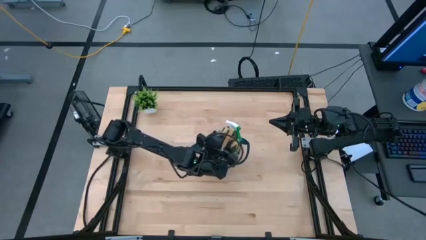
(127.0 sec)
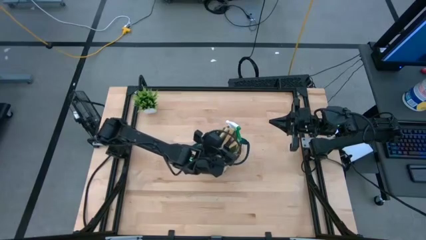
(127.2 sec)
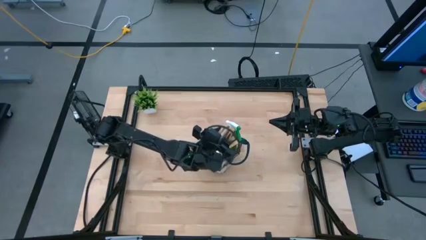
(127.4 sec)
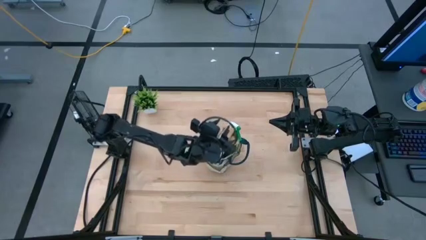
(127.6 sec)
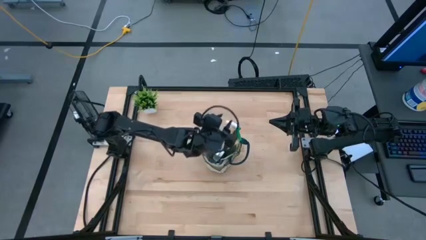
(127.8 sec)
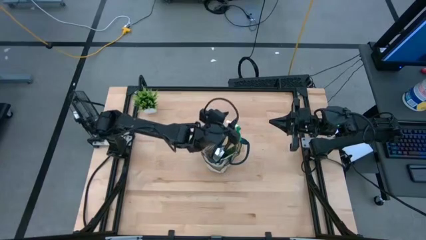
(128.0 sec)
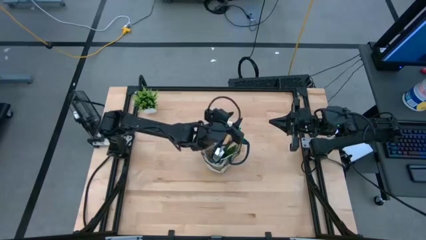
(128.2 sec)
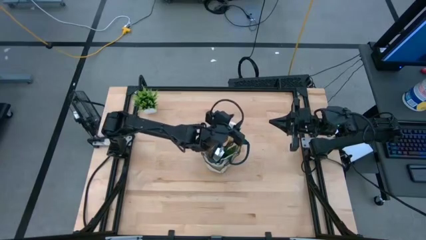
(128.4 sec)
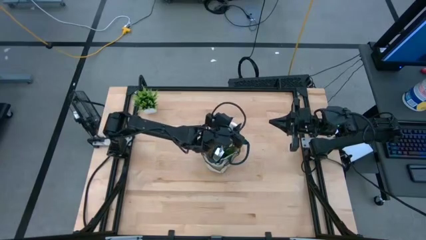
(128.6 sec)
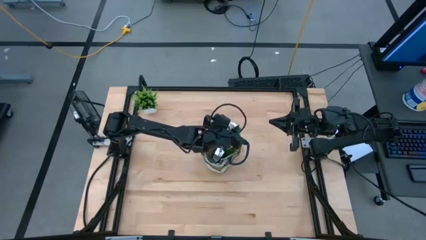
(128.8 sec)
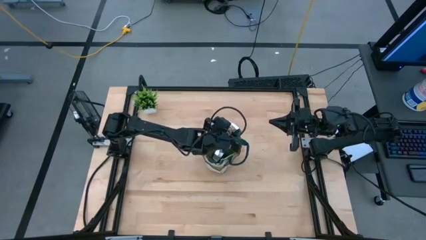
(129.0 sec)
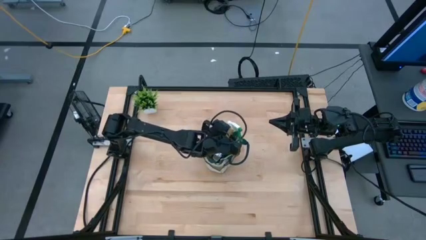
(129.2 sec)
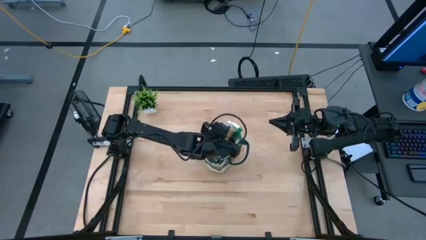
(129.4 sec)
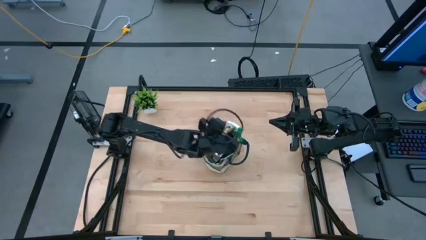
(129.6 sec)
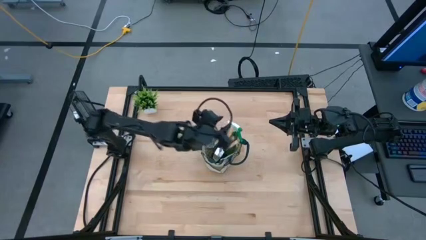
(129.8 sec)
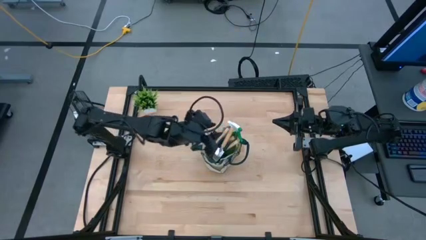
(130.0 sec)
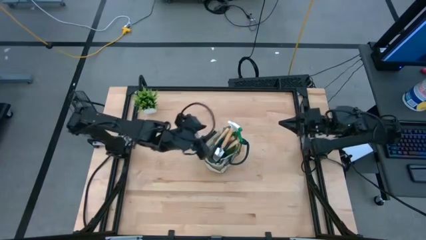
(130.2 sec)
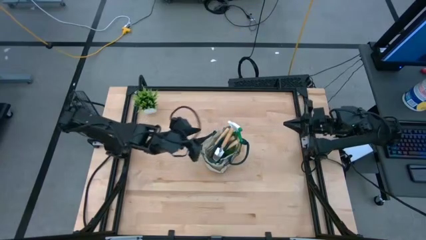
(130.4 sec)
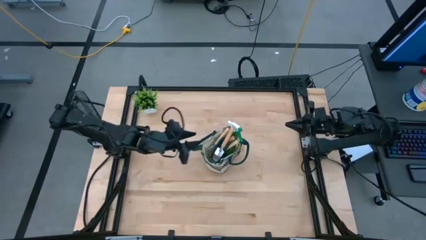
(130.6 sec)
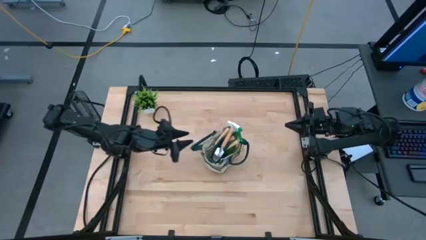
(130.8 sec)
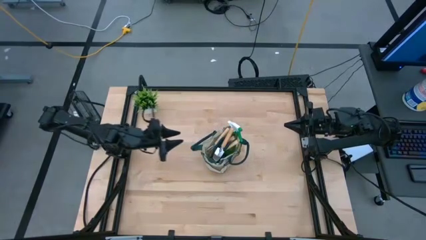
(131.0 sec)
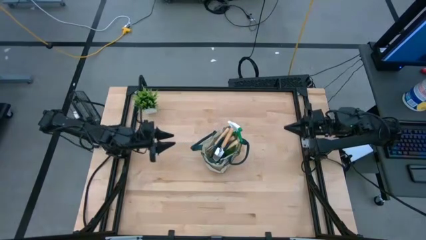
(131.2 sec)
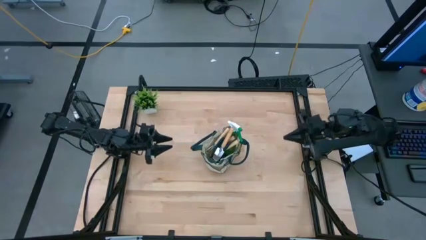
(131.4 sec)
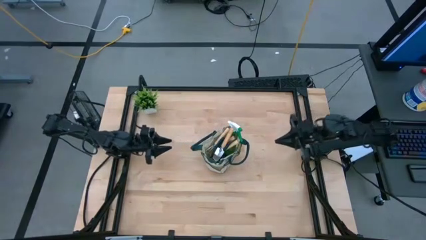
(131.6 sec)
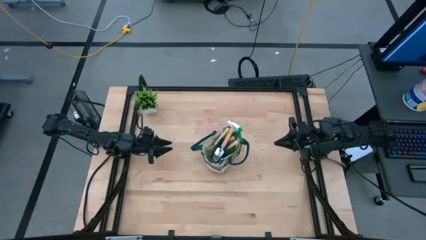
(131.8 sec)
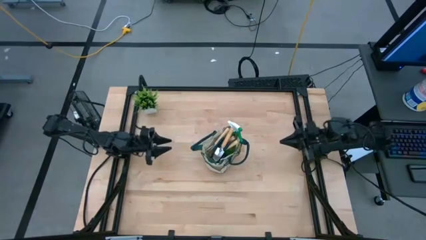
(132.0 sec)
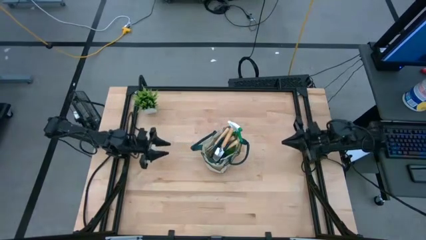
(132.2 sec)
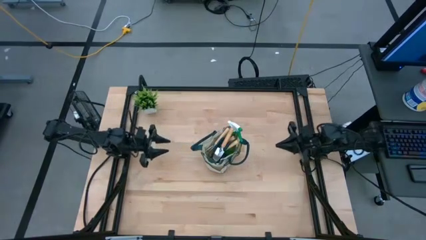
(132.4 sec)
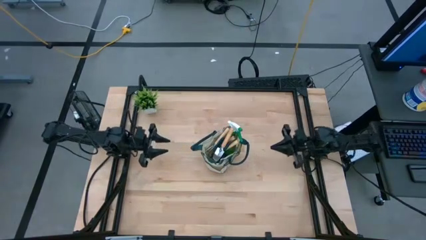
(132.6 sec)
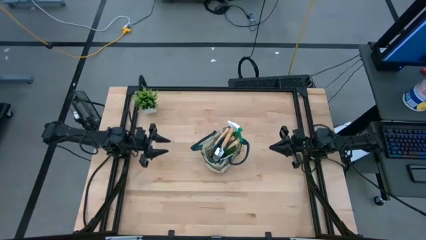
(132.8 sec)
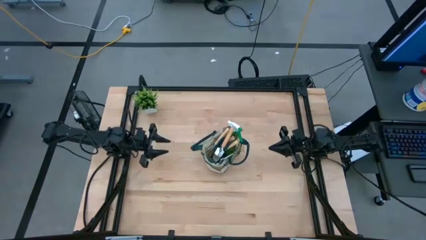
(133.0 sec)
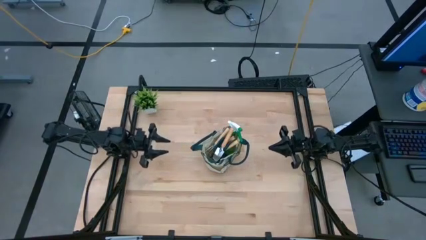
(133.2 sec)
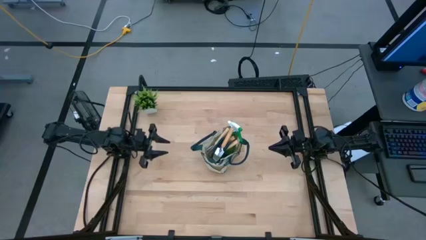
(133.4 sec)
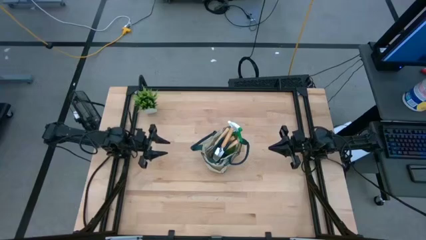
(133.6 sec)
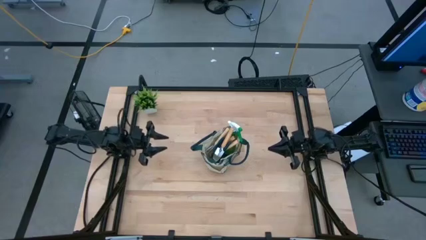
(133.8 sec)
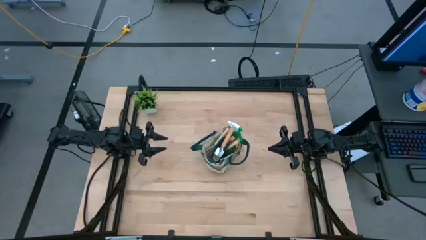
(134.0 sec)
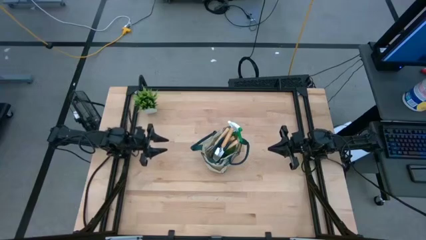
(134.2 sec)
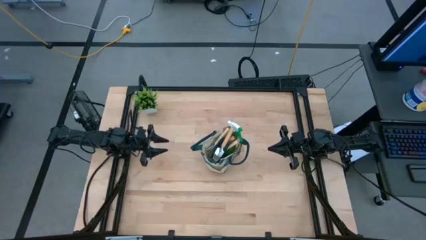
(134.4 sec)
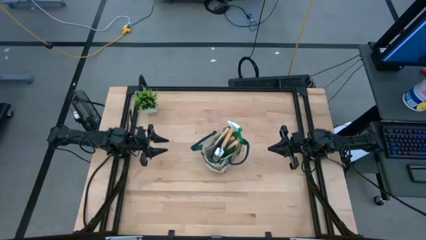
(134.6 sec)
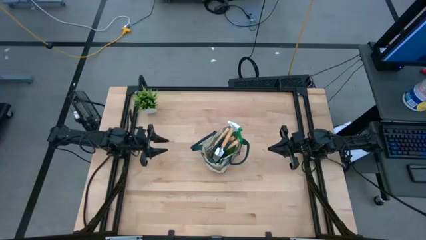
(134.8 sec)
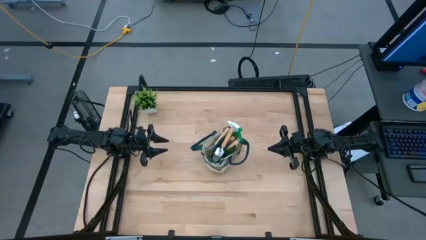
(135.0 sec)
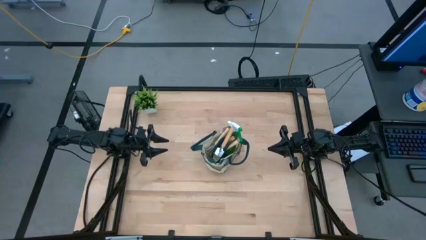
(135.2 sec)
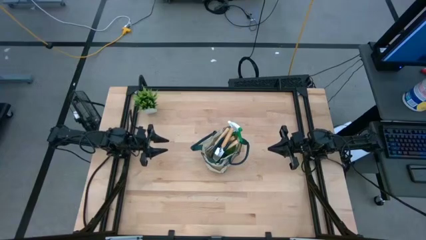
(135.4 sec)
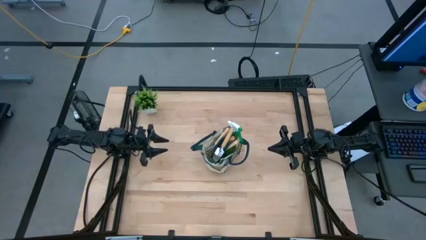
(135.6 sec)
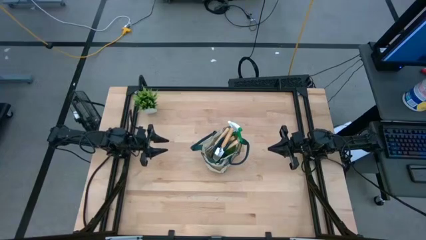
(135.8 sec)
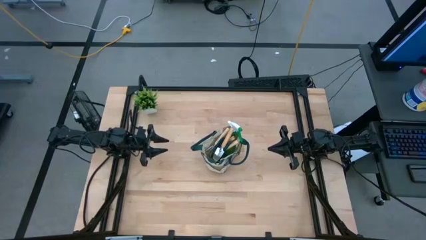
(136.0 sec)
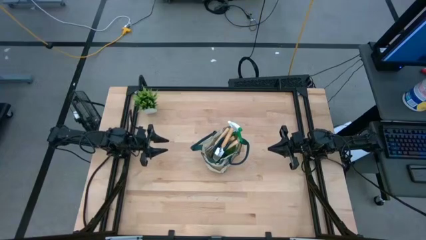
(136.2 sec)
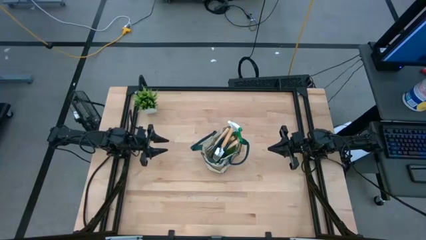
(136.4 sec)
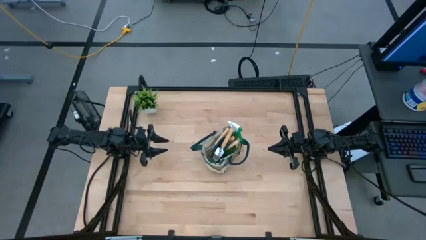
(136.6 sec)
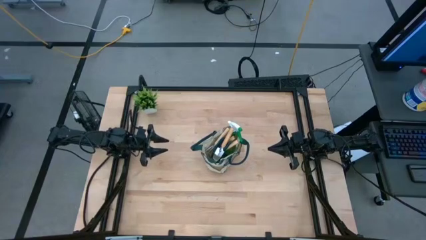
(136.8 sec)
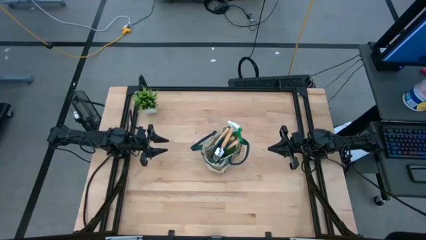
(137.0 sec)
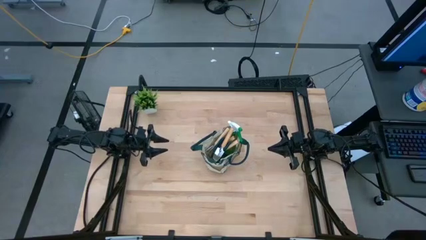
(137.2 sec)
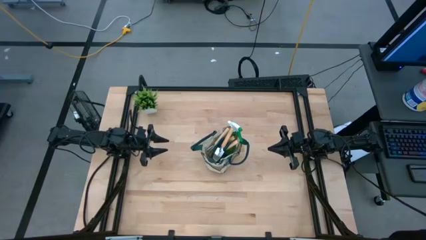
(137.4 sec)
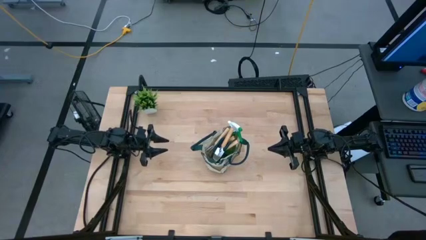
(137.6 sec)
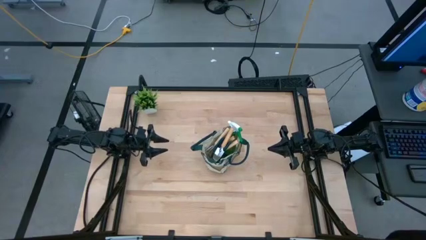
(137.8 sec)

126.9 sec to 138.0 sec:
Task: Pick & Place Garden tools in Gardening bag
Return to Home Position

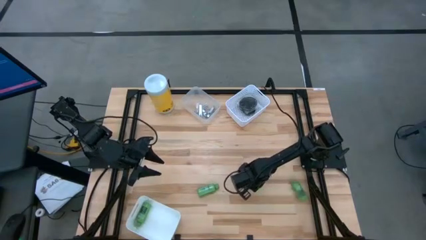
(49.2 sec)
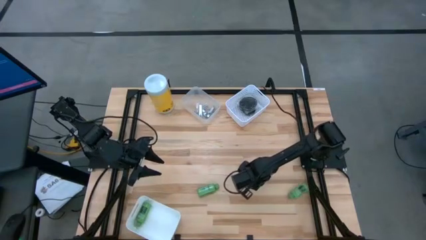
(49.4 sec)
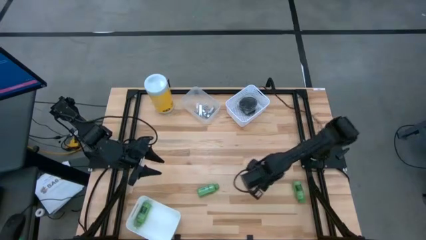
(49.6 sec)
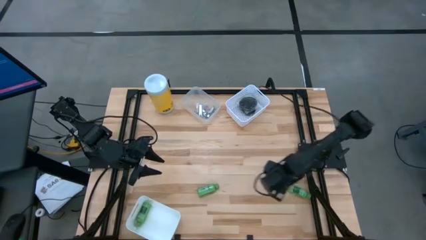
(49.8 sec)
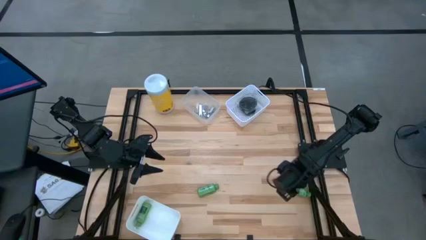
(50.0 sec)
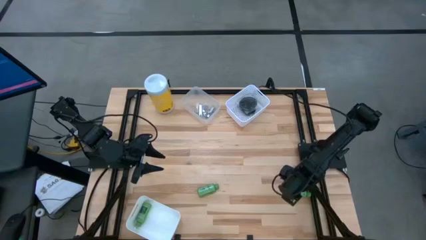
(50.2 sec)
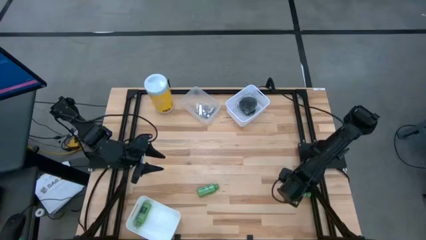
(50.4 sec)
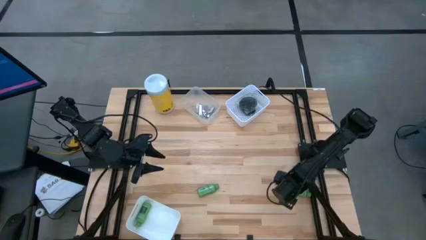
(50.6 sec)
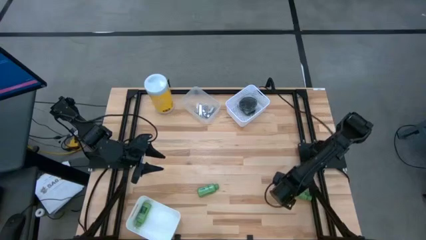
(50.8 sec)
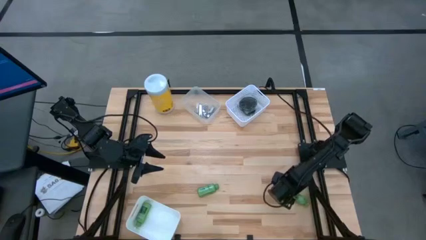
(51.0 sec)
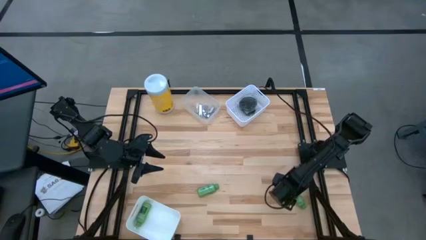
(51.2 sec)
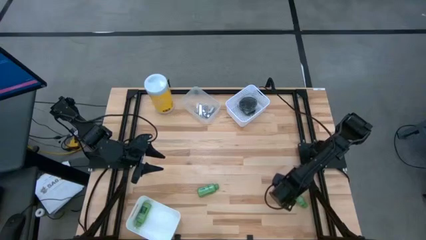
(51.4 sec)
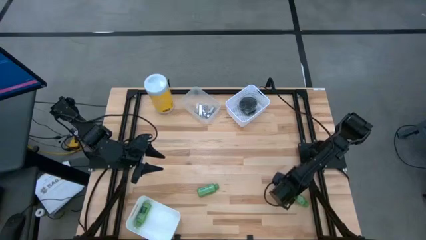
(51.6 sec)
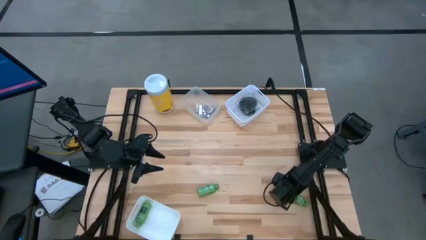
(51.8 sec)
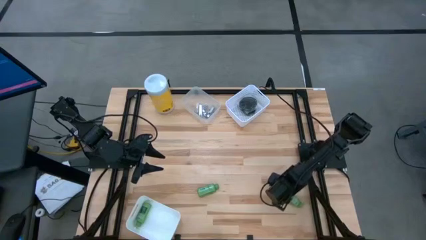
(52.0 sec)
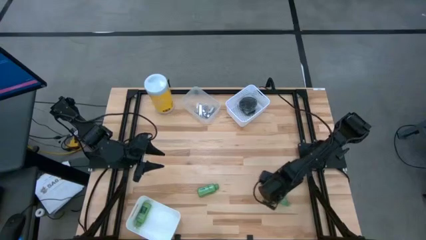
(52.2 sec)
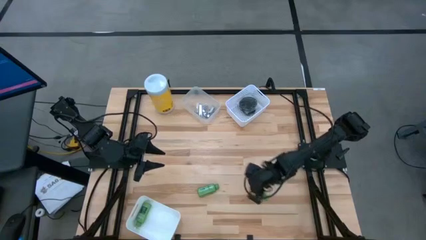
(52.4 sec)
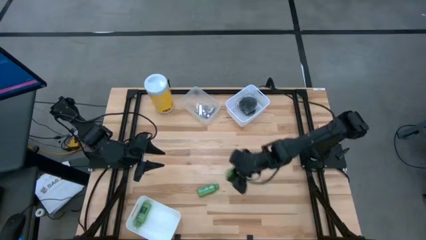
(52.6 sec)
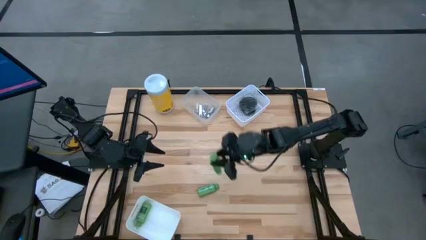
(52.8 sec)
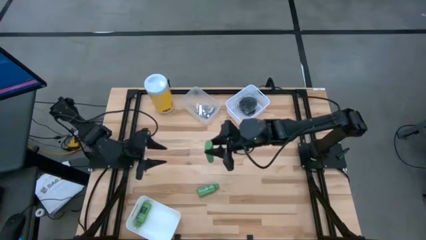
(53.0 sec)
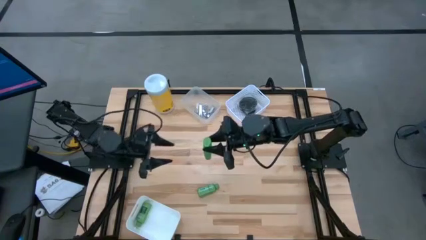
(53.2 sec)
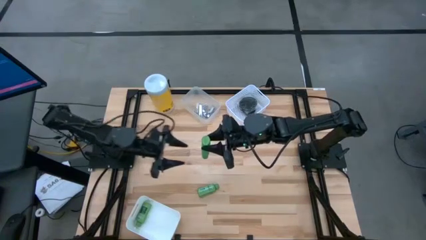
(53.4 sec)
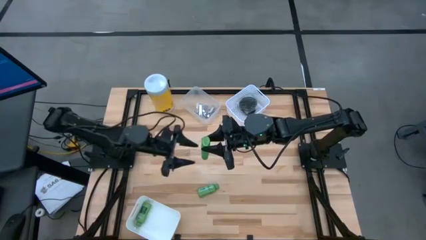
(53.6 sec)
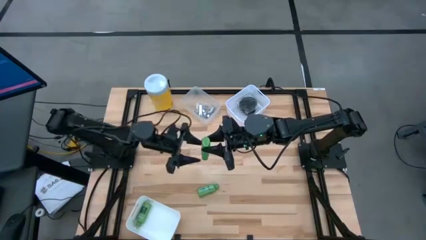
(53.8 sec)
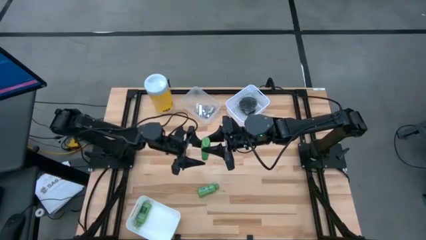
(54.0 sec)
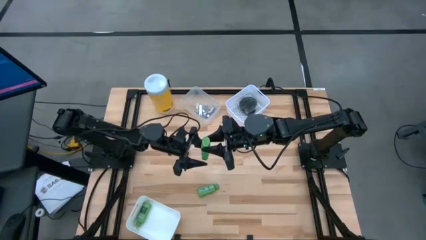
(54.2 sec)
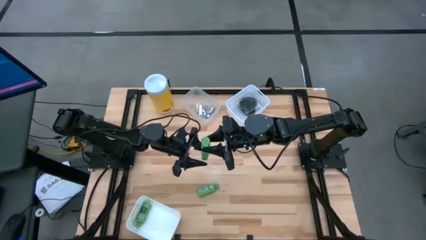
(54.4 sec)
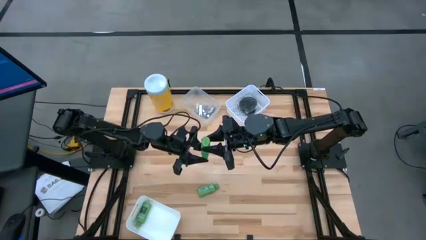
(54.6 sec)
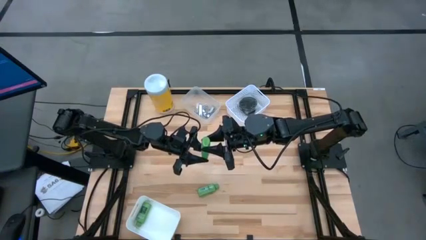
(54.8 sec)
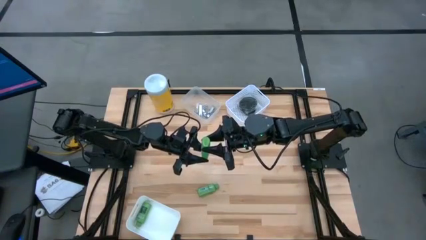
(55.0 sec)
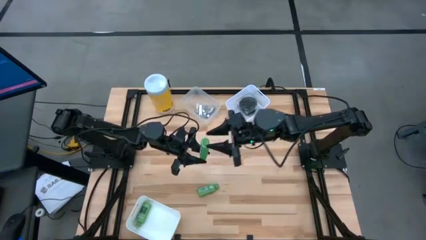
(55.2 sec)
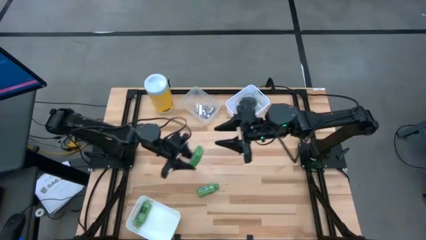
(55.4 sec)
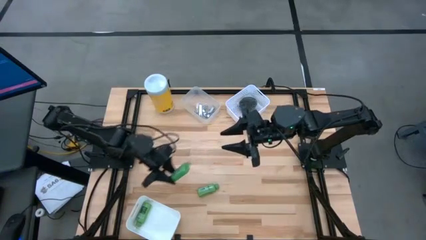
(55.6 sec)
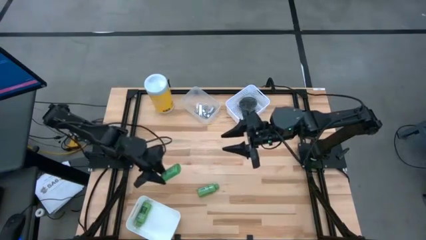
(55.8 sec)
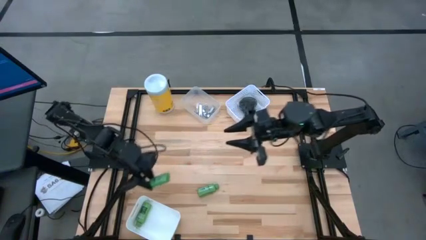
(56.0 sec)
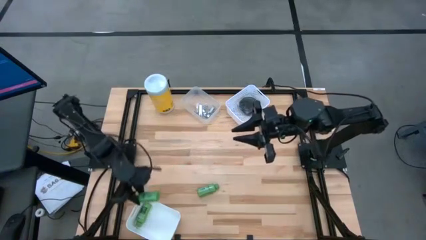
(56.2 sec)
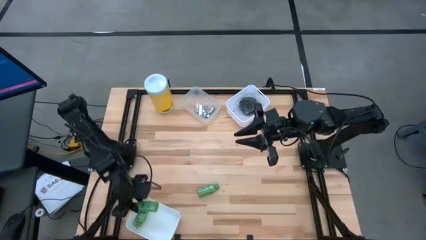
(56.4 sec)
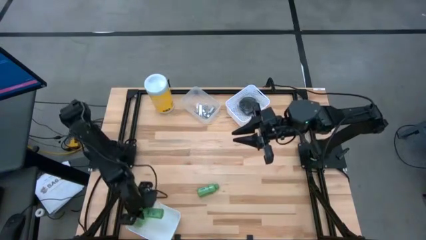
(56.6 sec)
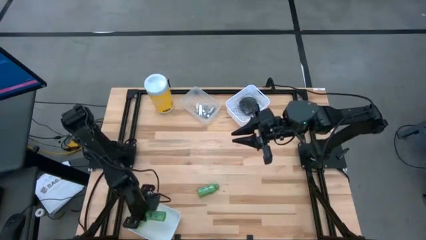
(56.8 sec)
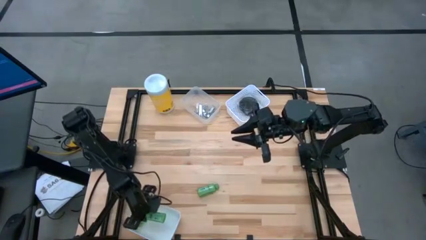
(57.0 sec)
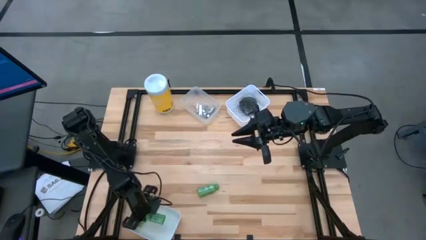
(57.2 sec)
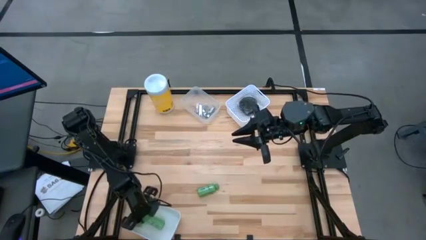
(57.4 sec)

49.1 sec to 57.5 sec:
Task: Pick & Place Travel size toiletries
Put the green shampoo into the bottom white bin
